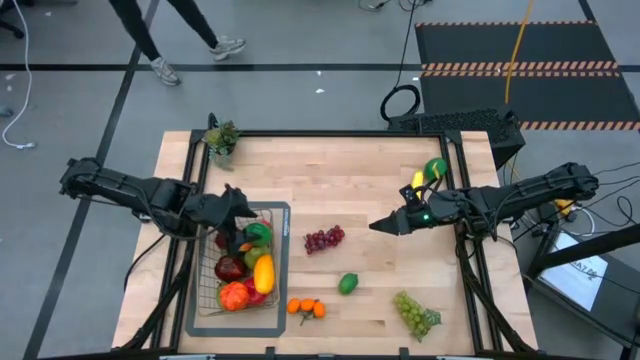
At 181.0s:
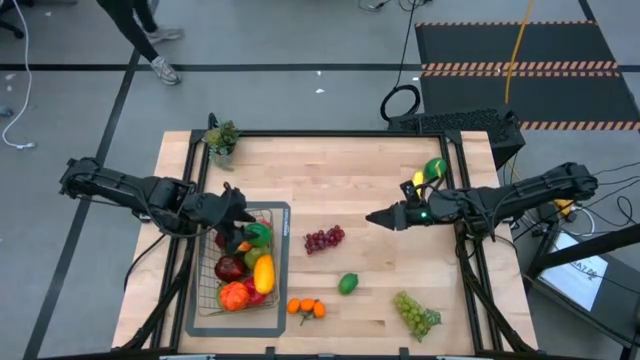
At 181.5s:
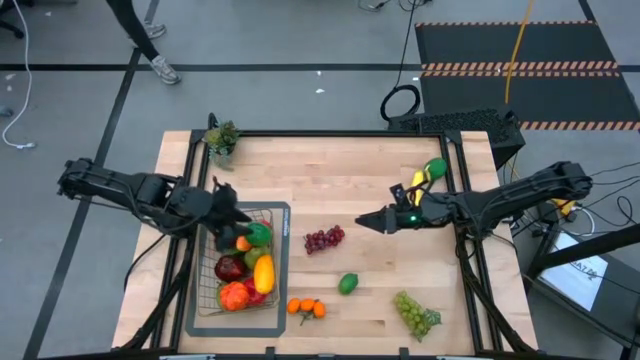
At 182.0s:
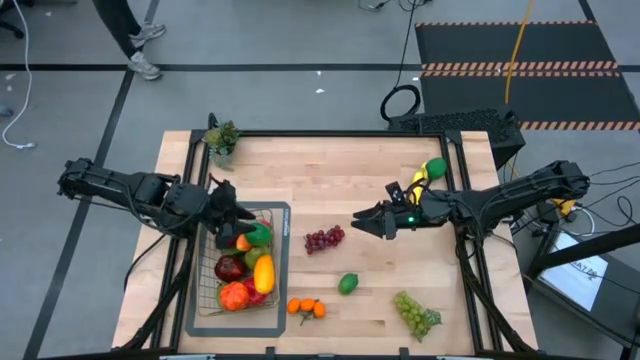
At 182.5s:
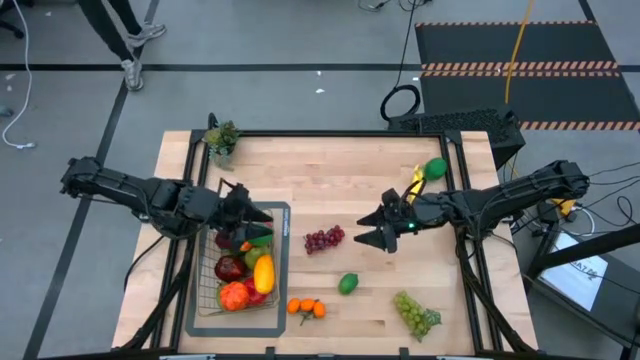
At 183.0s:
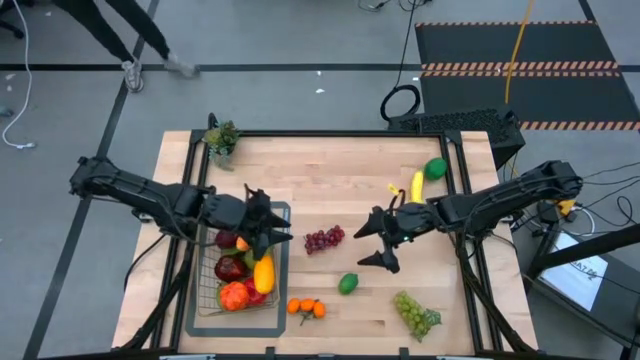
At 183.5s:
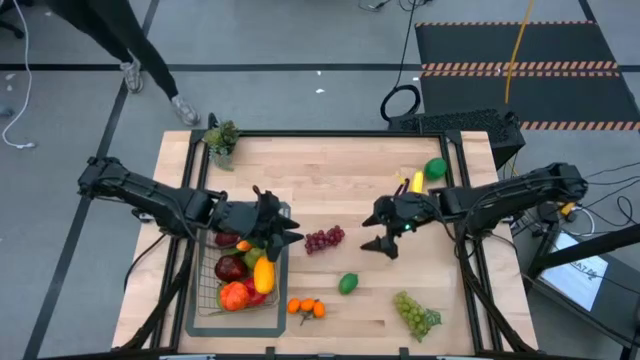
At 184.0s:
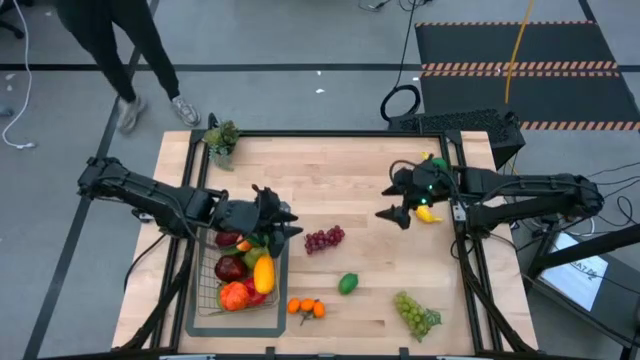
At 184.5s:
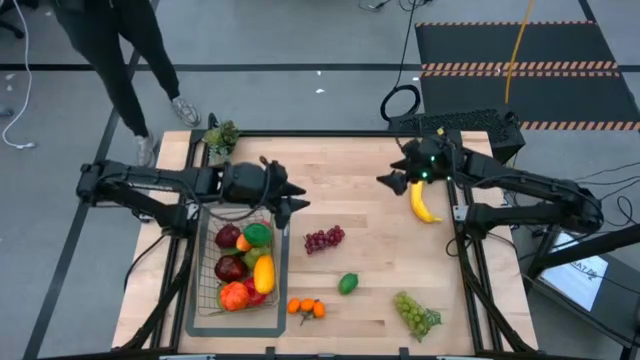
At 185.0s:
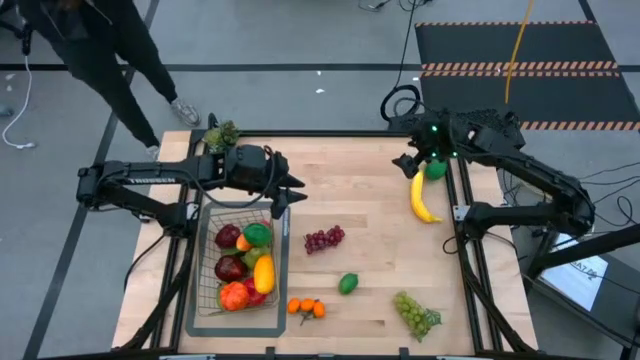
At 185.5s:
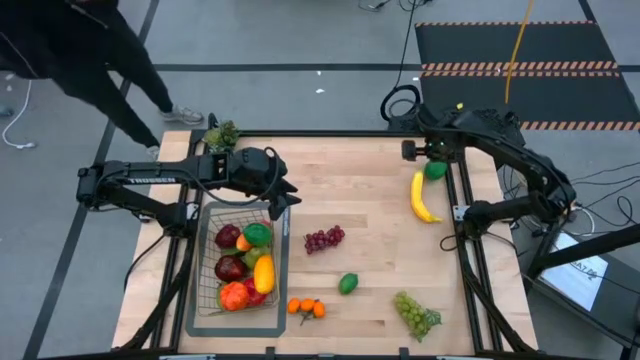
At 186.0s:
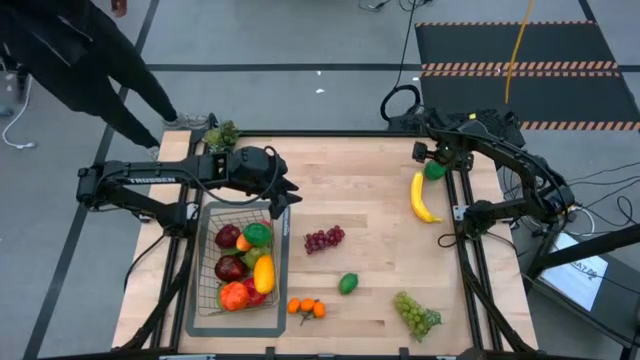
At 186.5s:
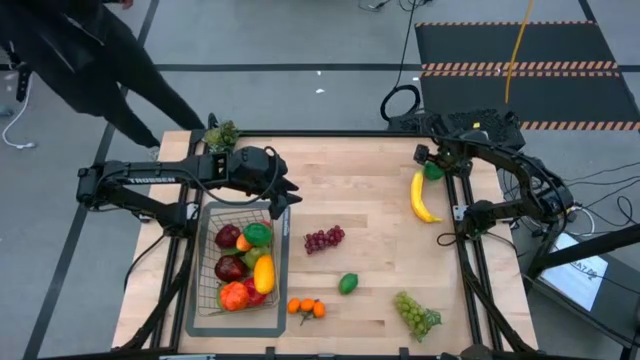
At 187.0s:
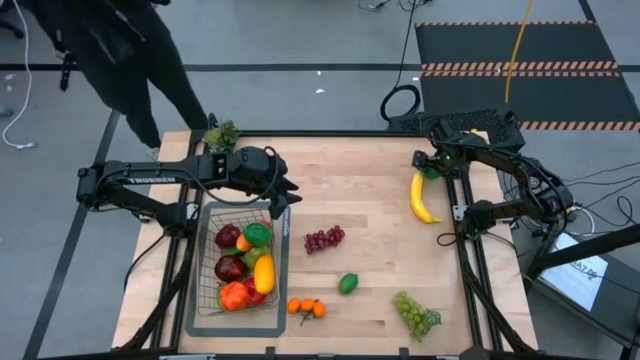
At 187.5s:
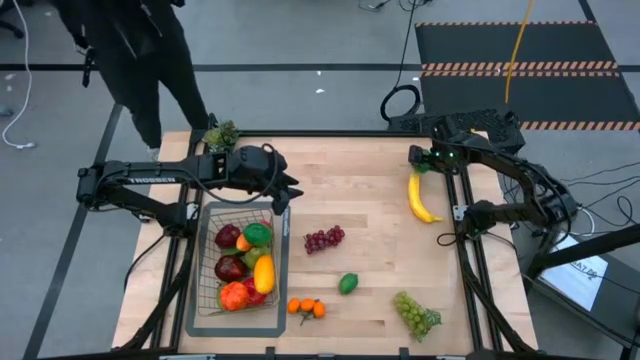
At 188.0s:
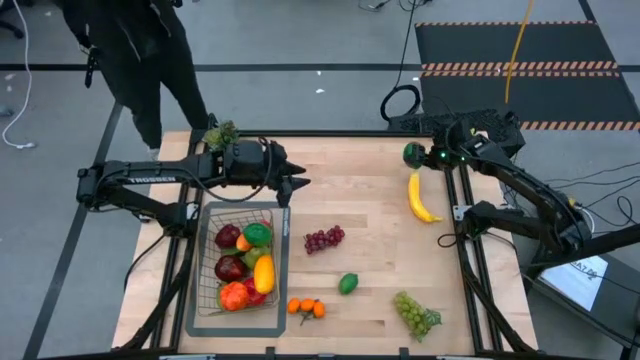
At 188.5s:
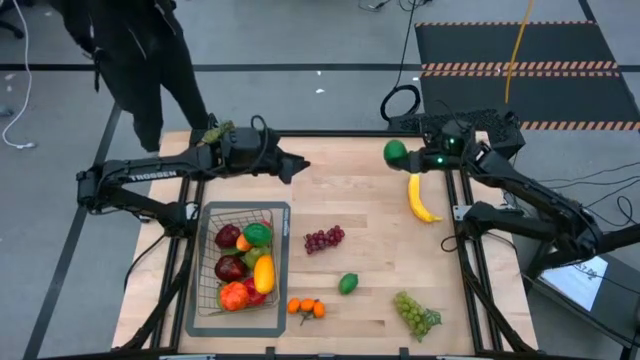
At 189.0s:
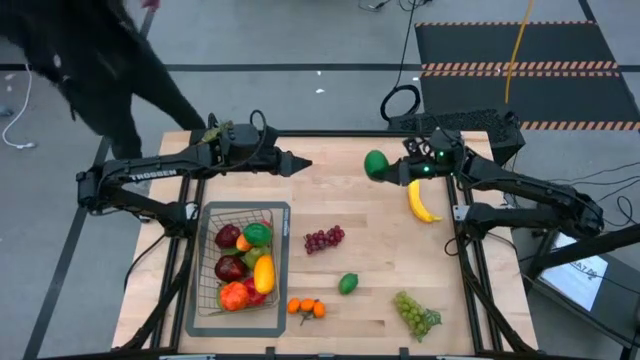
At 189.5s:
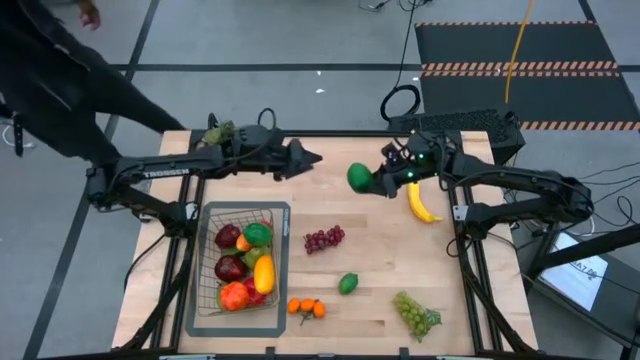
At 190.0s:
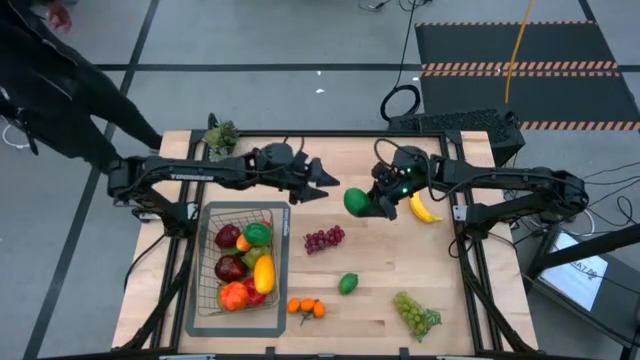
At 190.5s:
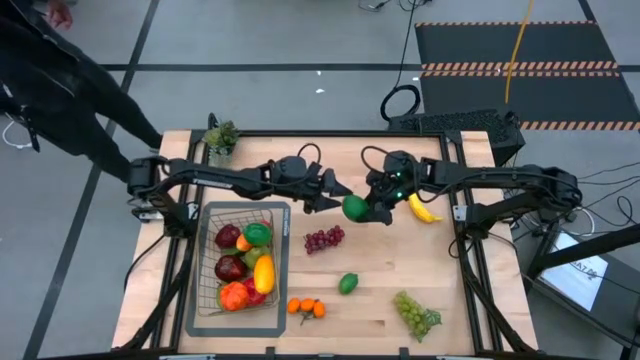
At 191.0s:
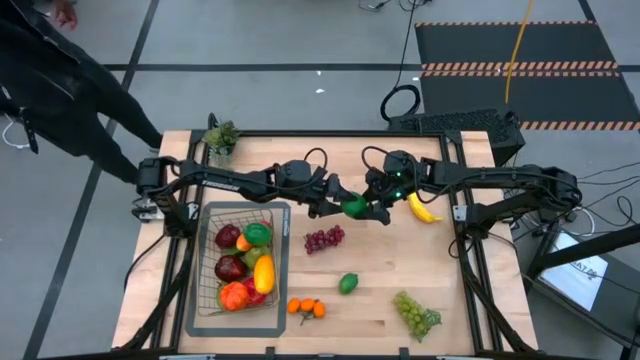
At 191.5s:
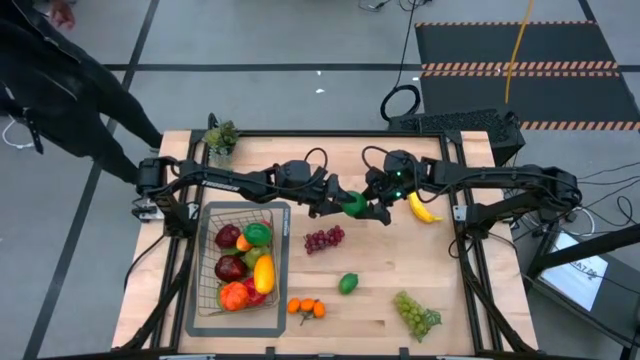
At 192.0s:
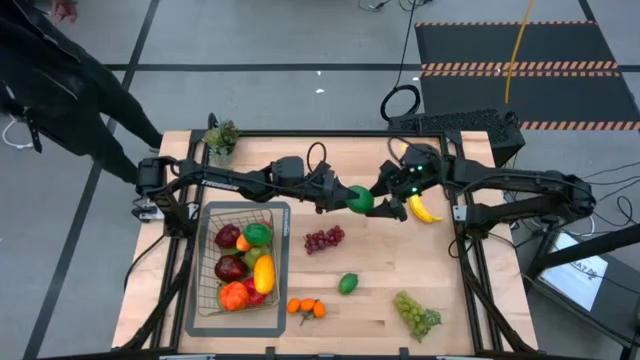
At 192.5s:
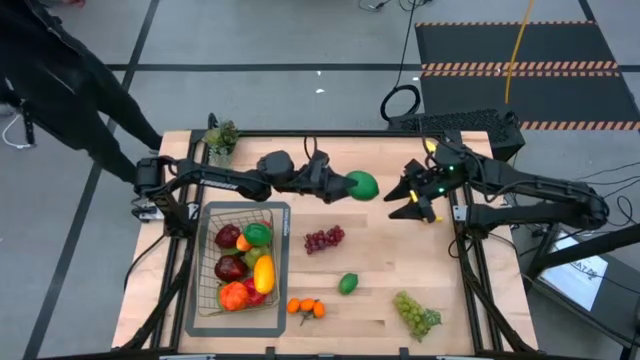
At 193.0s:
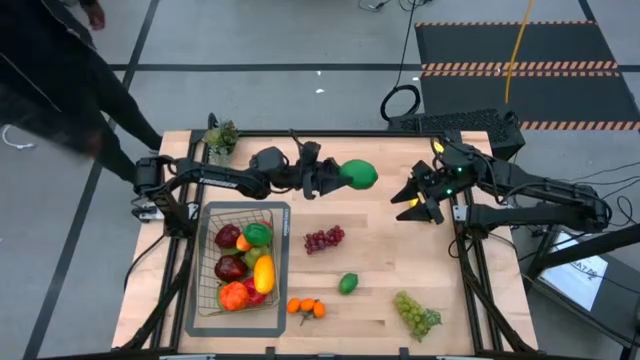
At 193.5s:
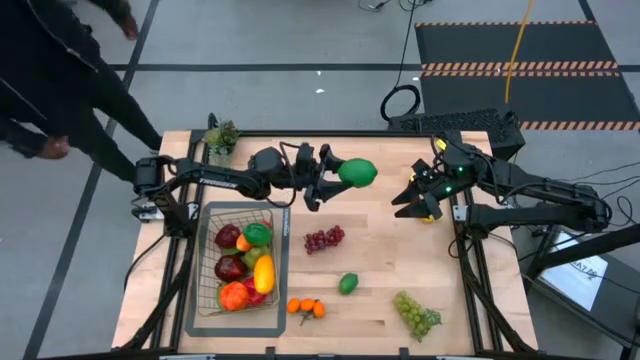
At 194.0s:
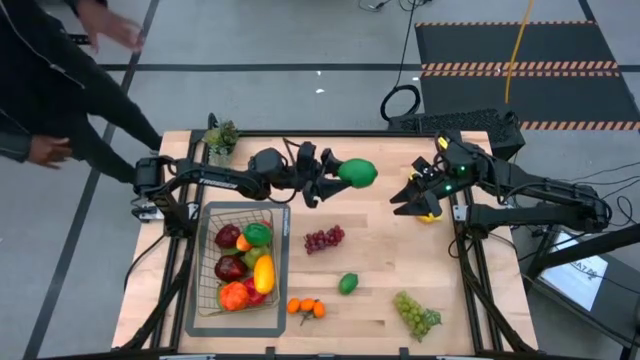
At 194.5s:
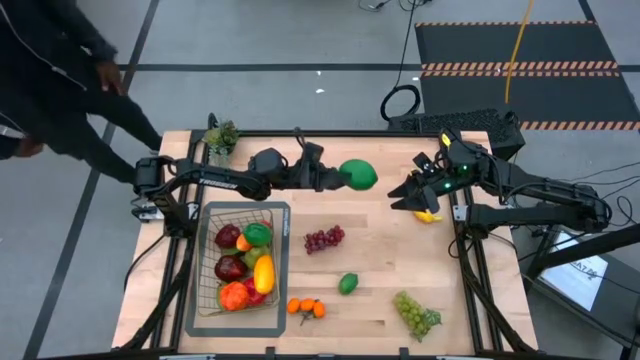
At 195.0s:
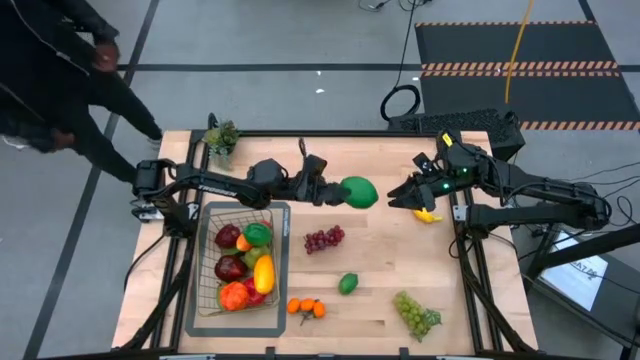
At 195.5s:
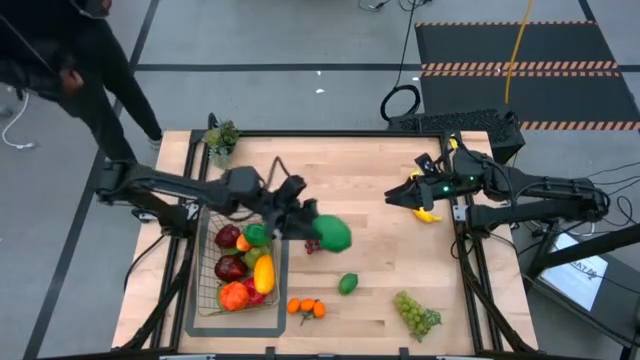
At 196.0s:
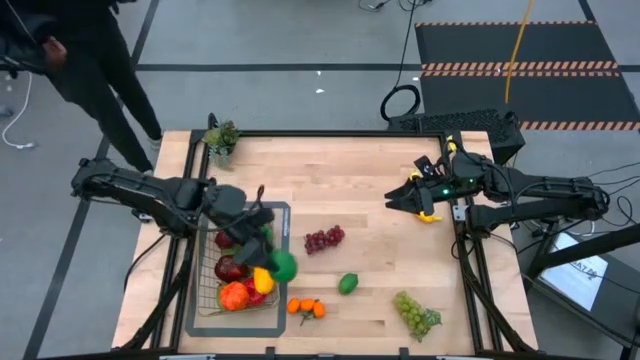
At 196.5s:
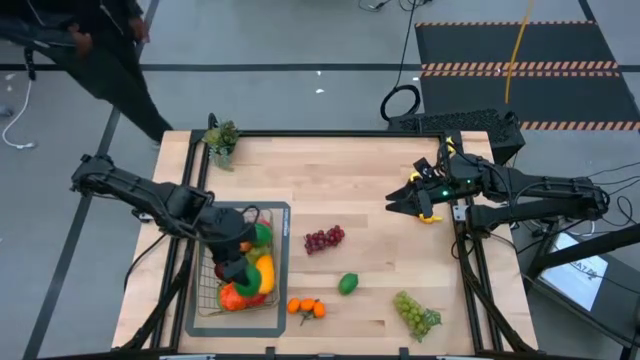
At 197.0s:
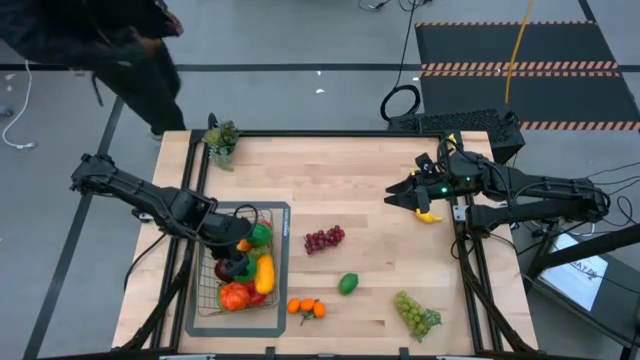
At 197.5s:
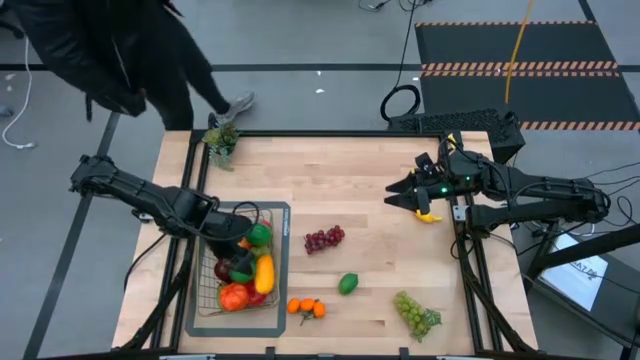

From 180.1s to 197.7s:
Task: Build produce basket
Put the top green lime into the wire basket

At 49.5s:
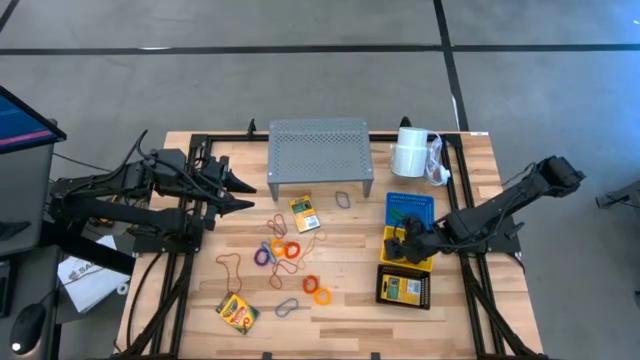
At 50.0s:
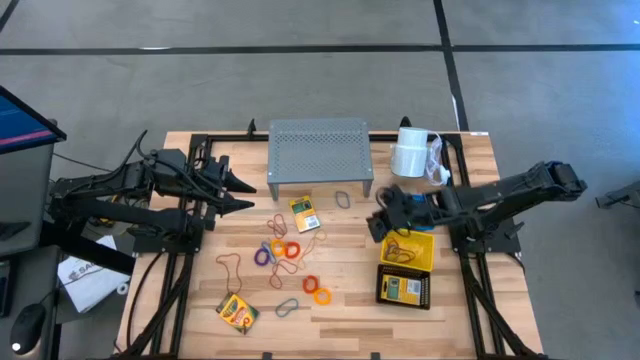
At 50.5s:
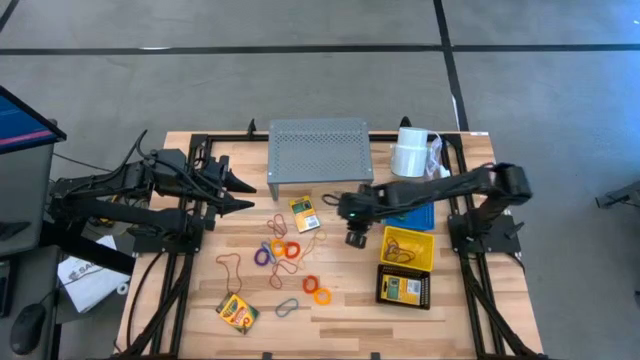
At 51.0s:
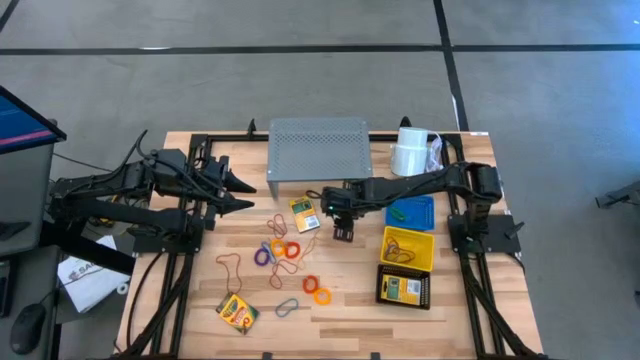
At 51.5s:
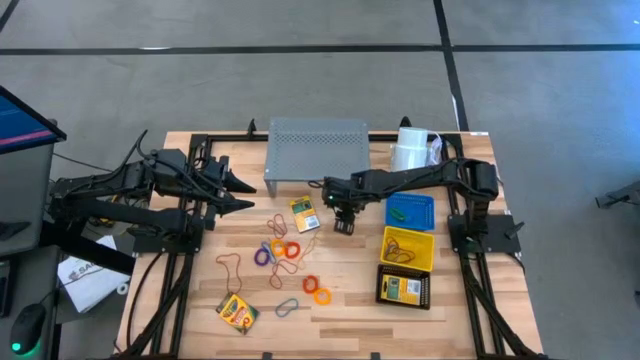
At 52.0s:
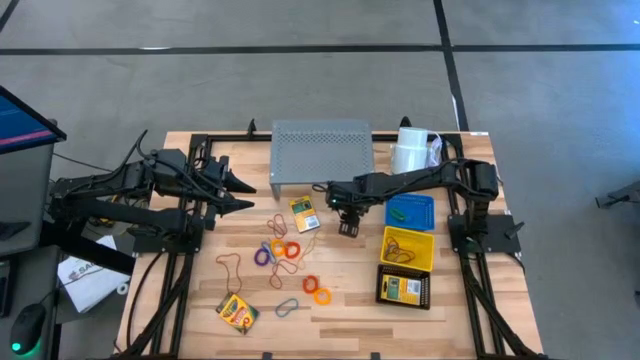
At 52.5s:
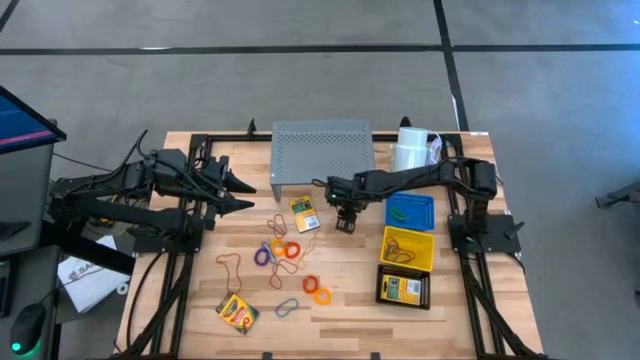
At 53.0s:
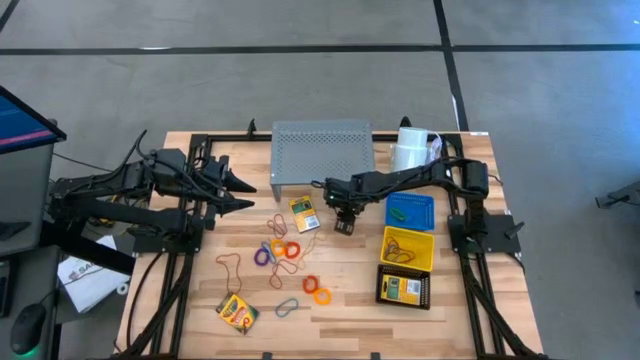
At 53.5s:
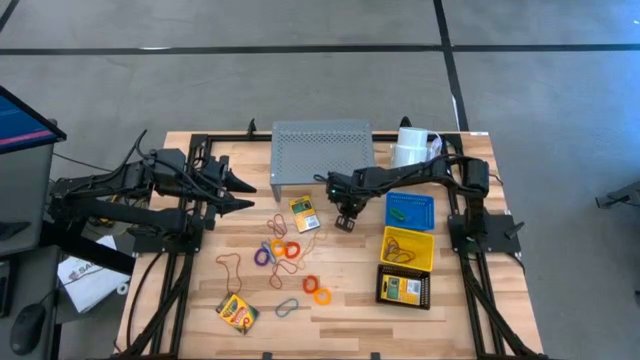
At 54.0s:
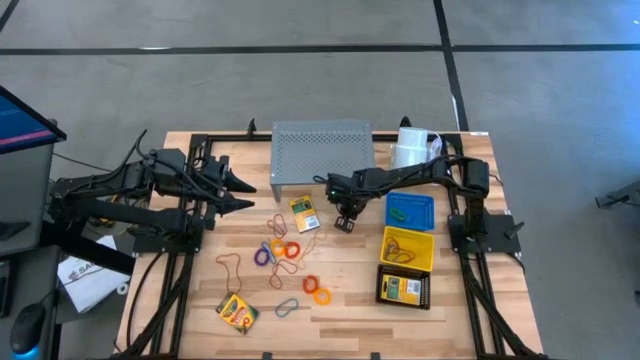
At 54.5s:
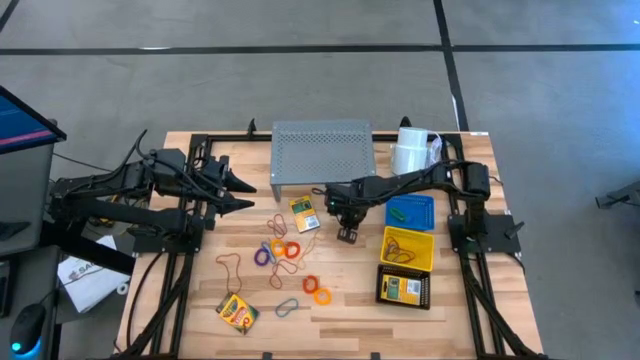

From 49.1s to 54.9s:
Task: Pick & Place Office Desk Supplies
Put the blue rubber band into the yellow basket
